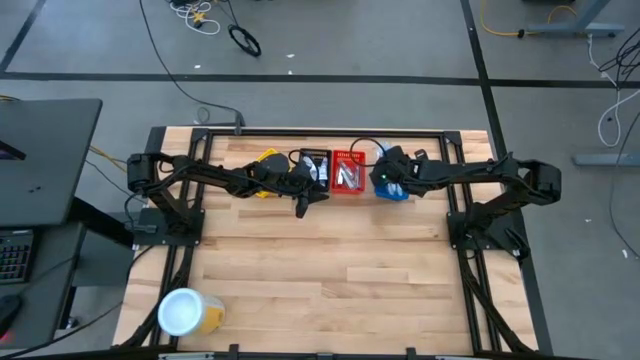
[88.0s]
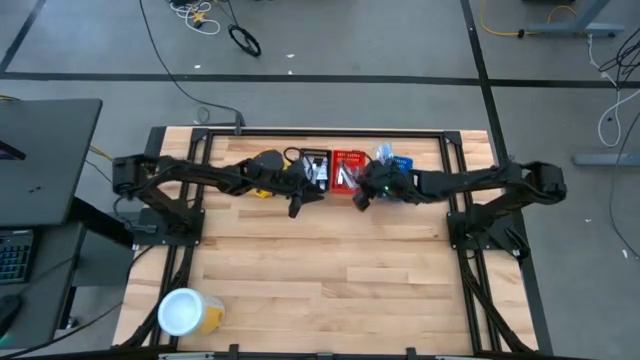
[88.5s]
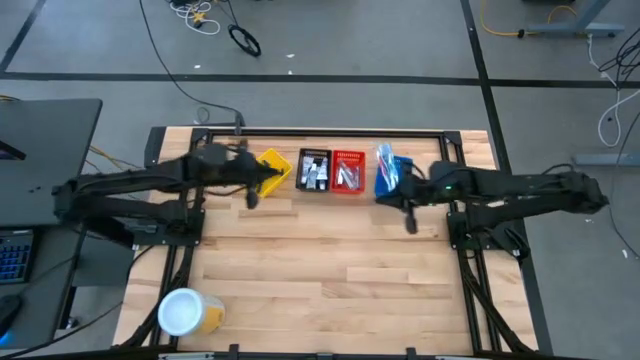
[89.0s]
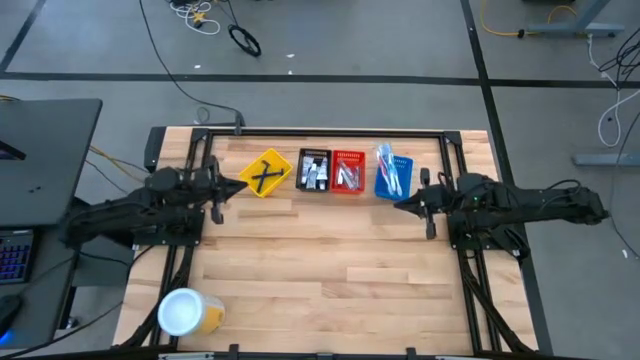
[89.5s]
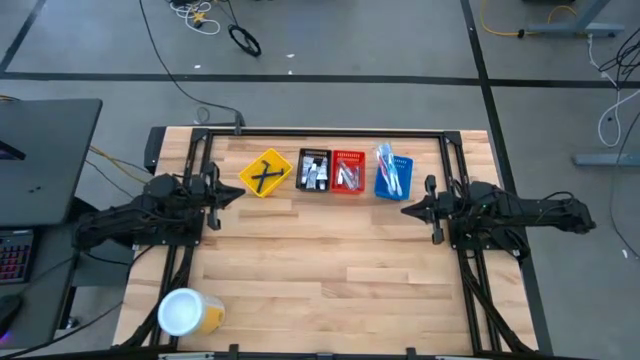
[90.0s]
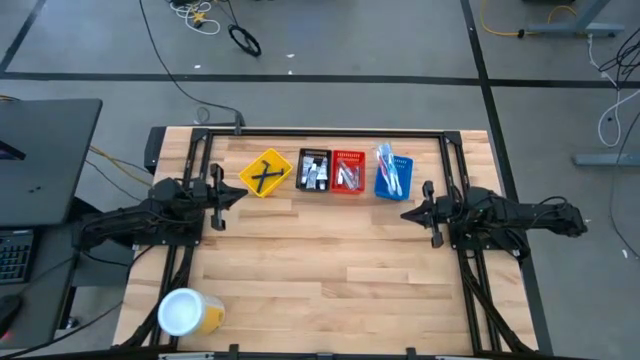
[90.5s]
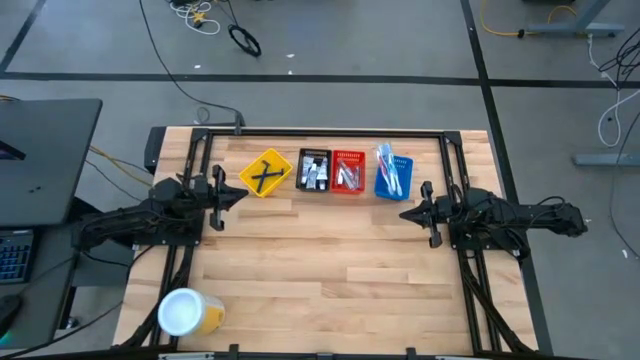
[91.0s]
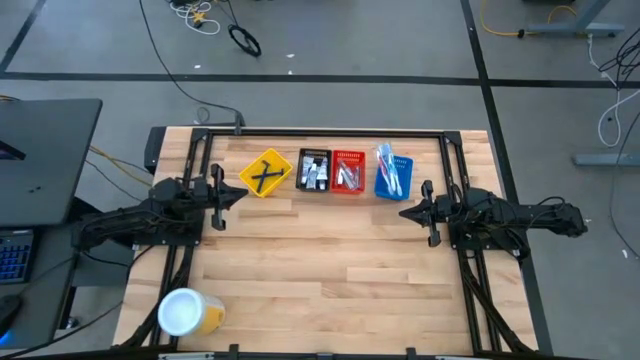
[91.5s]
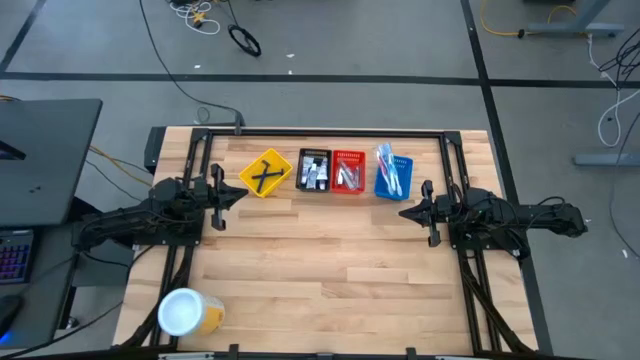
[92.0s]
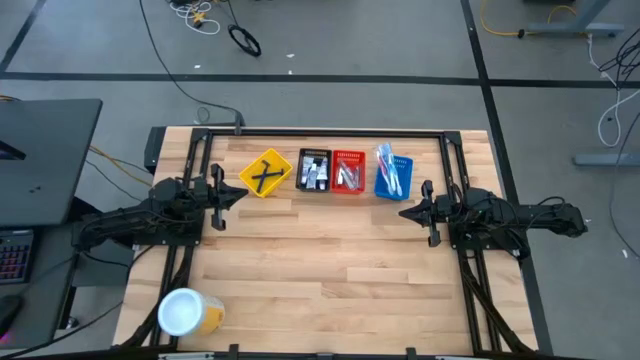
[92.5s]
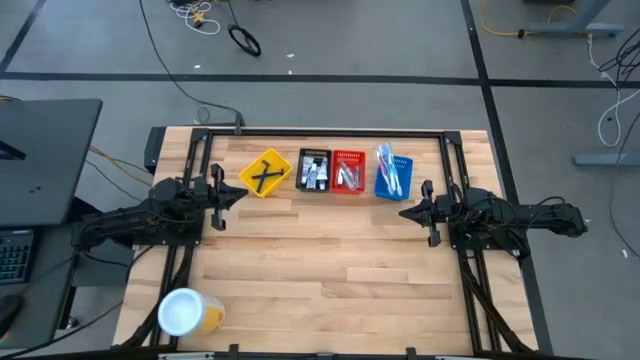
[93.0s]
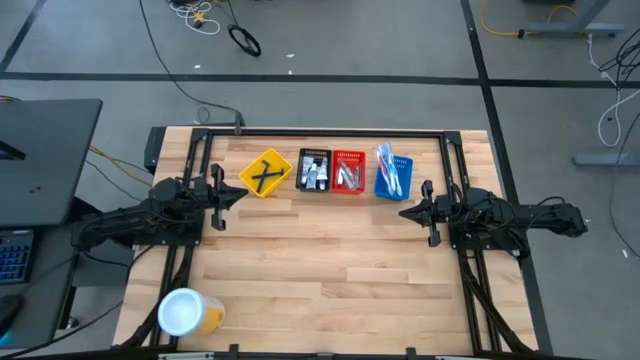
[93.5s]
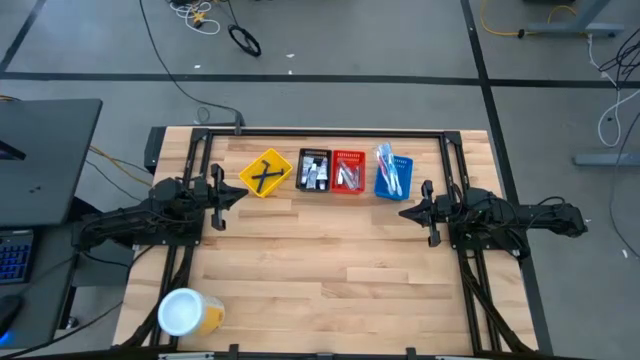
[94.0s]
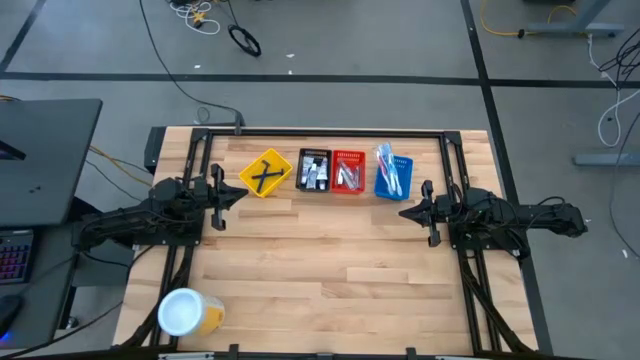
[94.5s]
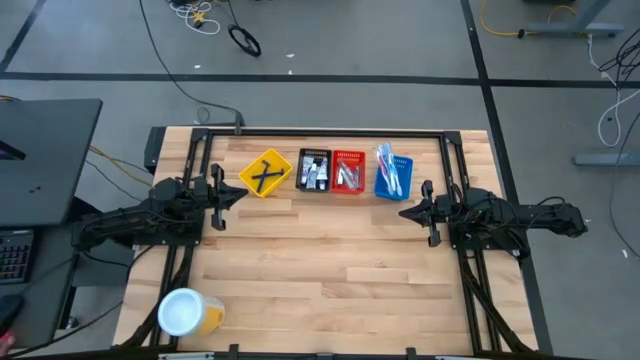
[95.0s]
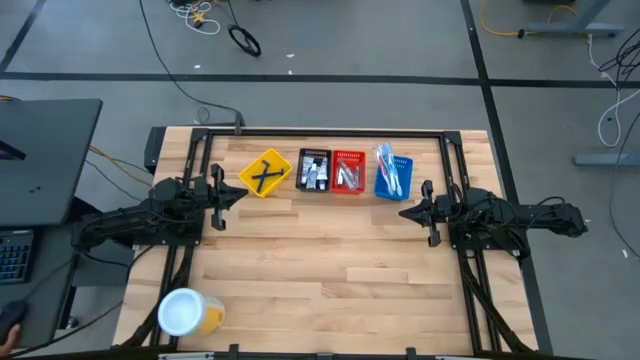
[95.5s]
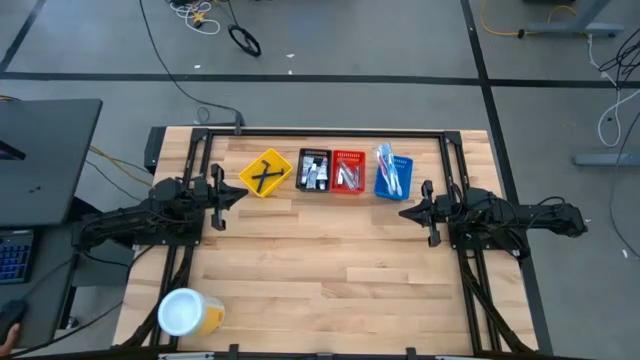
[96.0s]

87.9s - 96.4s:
Task: Pick & Place Travel size toiletries
Return to Home Position

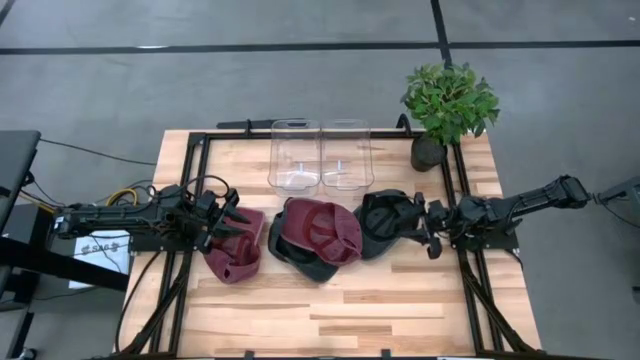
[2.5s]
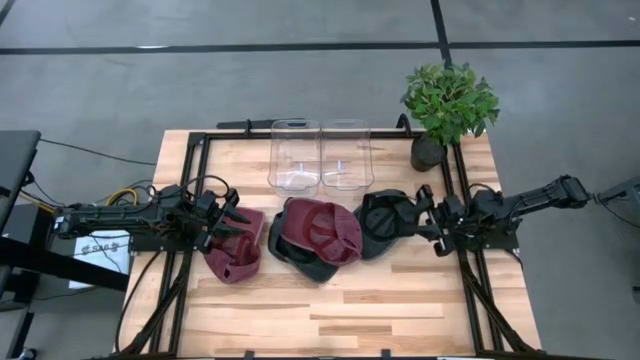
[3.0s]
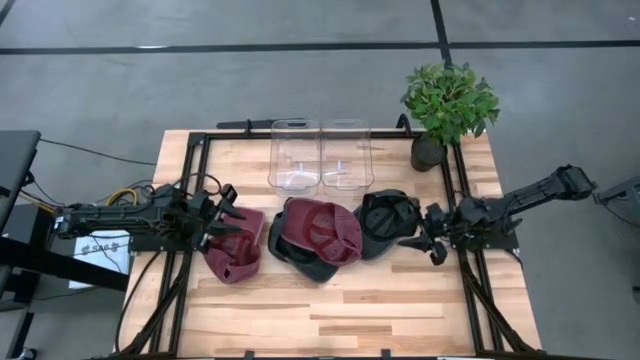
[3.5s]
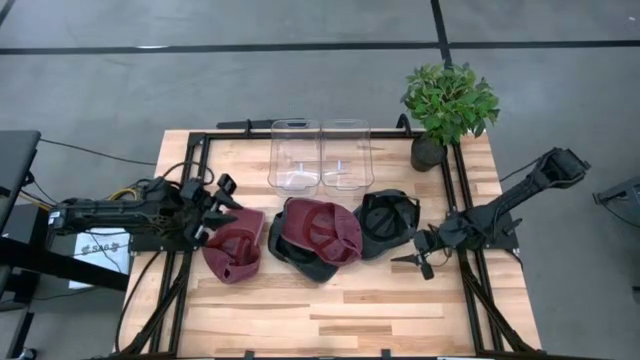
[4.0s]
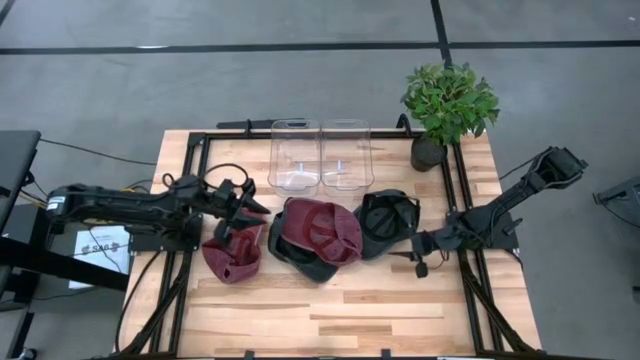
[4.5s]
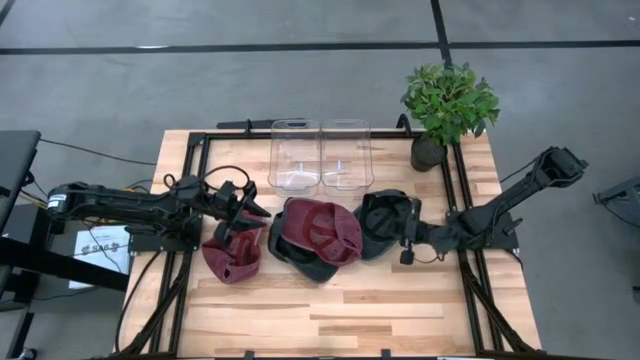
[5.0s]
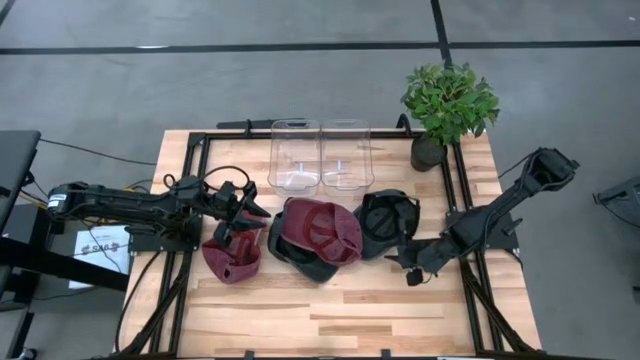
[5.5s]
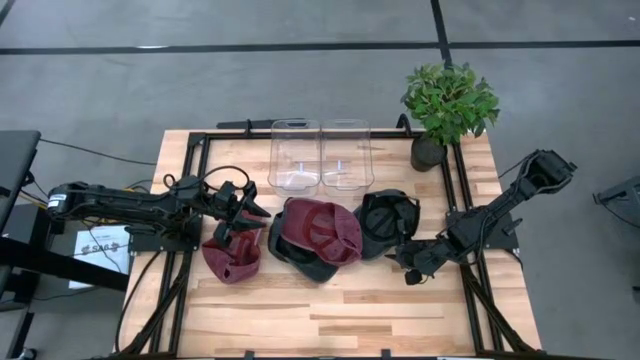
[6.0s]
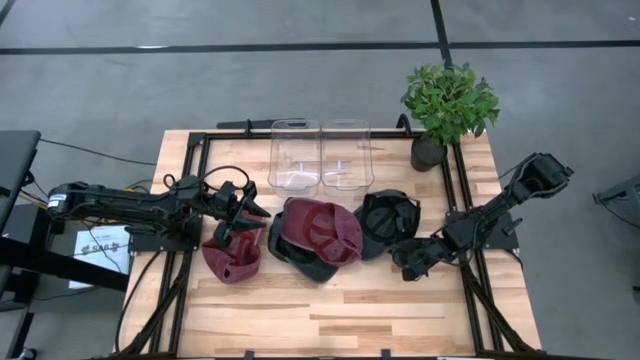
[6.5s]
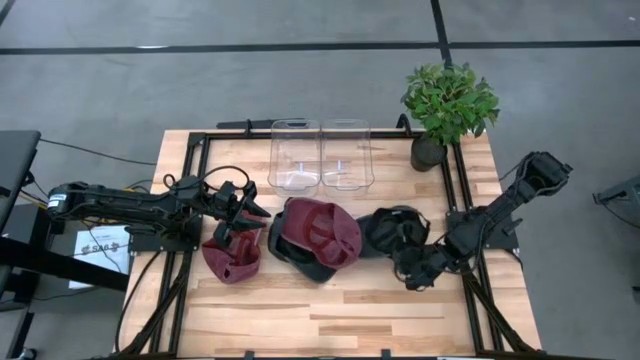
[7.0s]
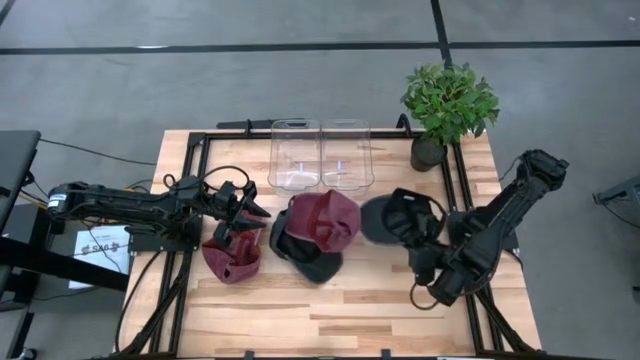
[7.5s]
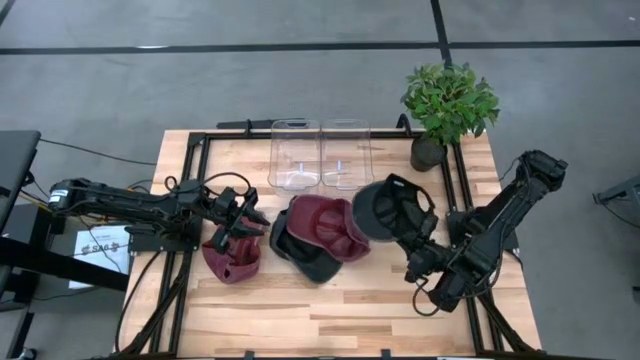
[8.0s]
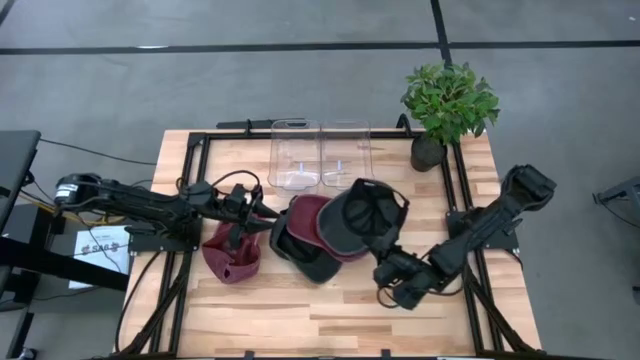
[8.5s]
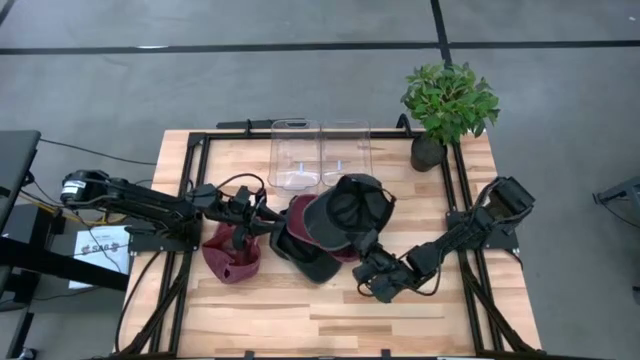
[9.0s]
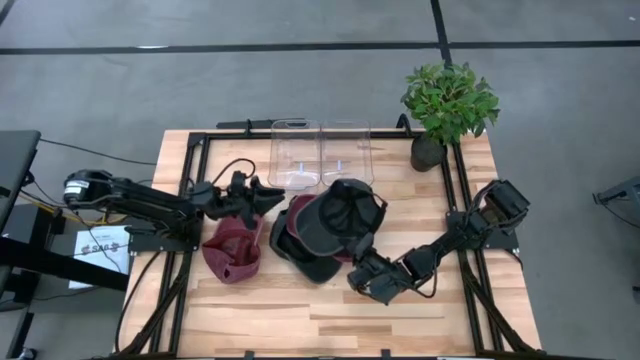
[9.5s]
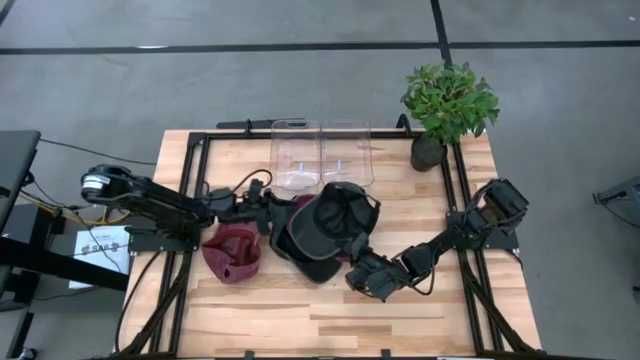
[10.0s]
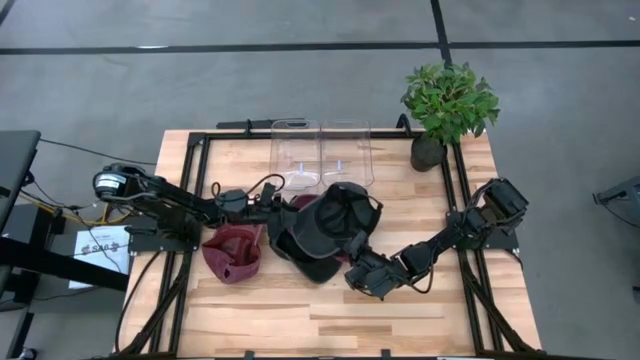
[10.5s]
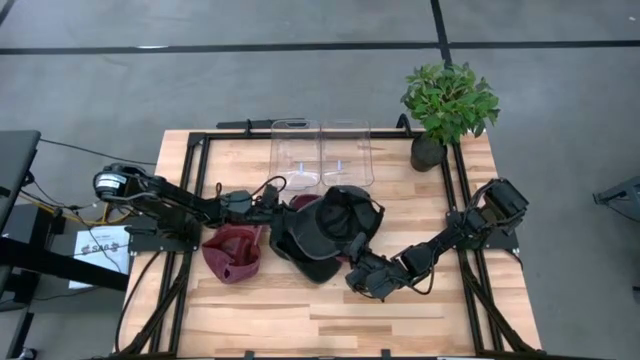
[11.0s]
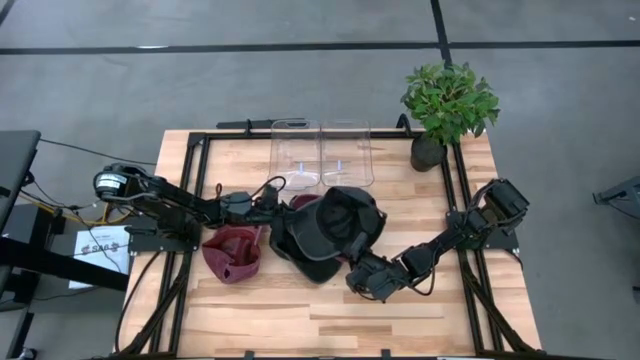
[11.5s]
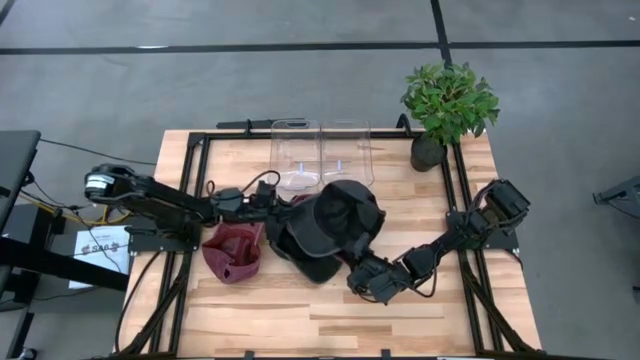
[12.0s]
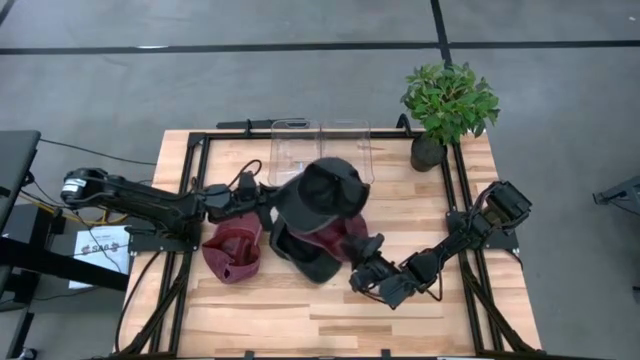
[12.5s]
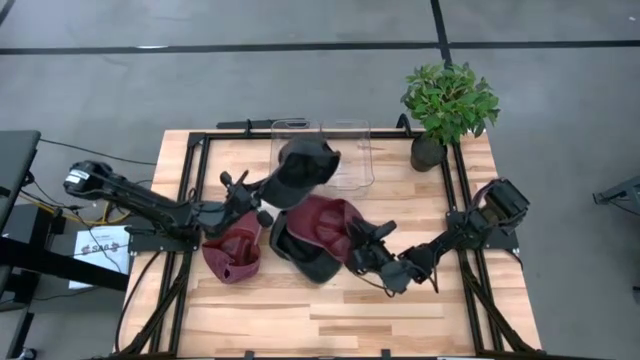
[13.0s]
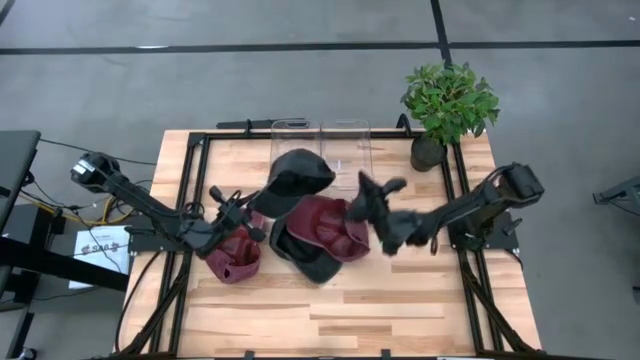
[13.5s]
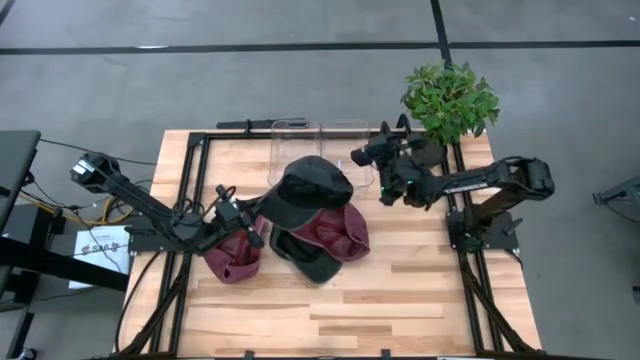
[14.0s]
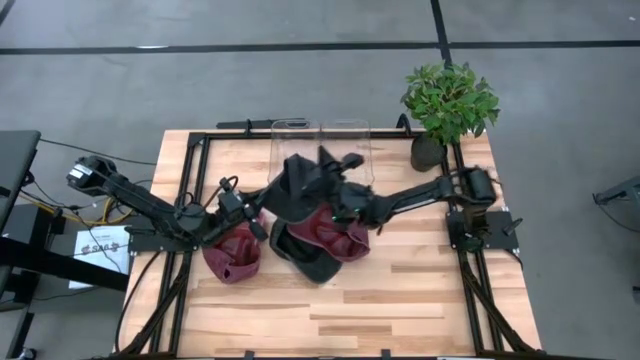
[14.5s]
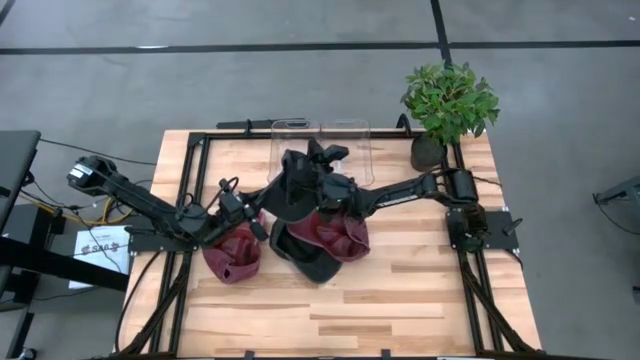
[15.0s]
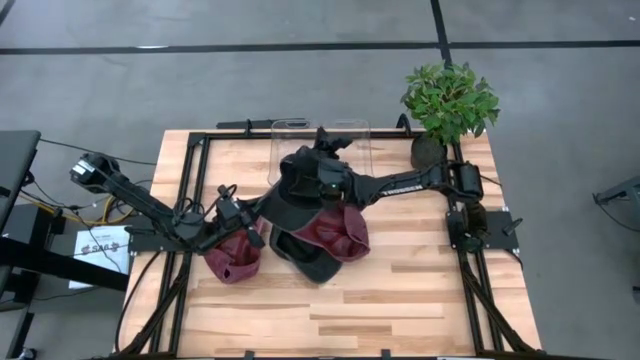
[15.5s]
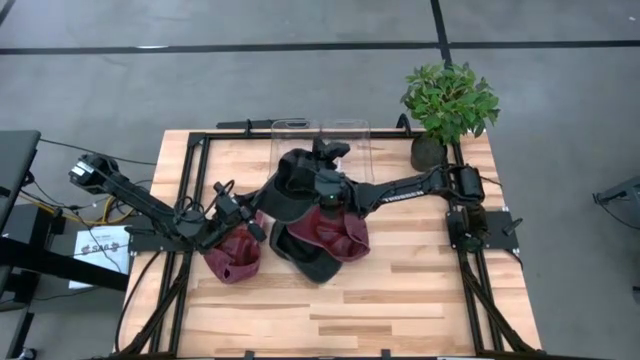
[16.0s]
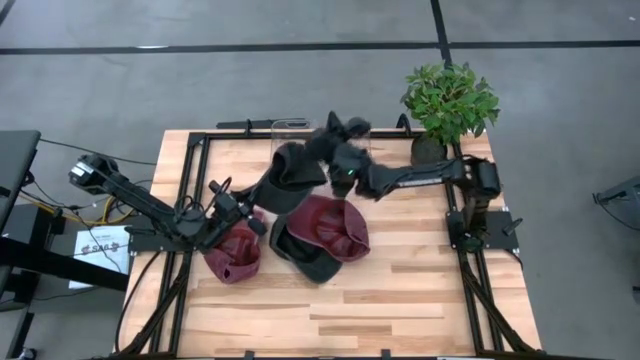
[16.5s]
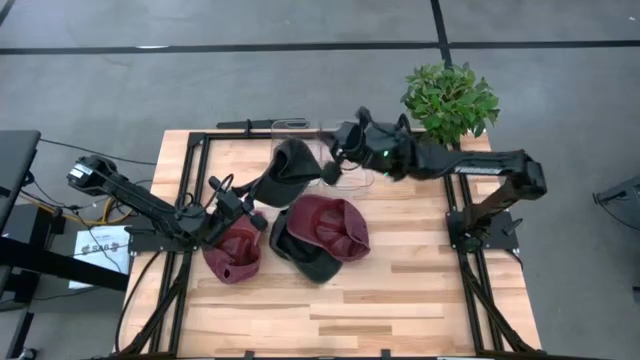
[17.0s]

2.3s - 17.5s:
Task: Pick & Place hat
Put the right black cap into the right transparent bin
